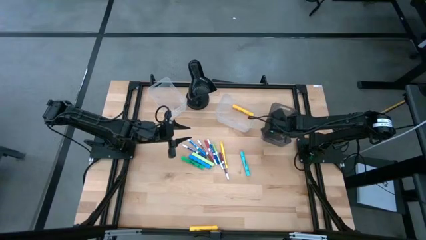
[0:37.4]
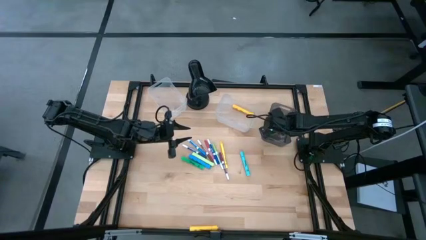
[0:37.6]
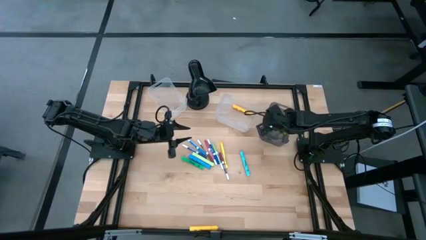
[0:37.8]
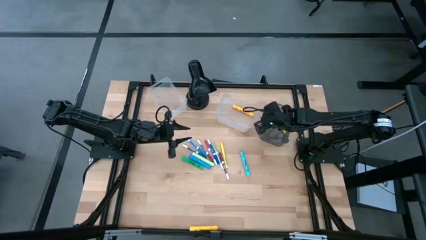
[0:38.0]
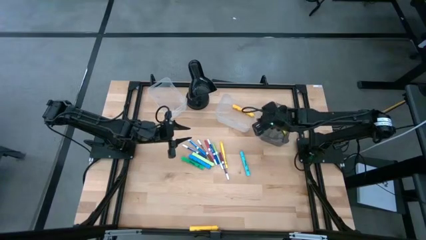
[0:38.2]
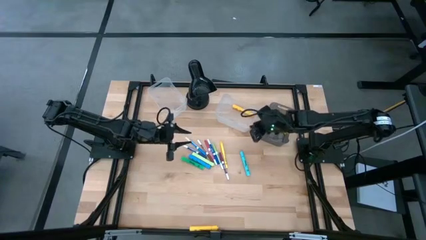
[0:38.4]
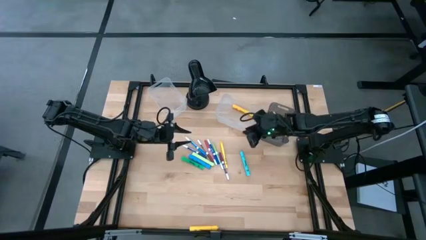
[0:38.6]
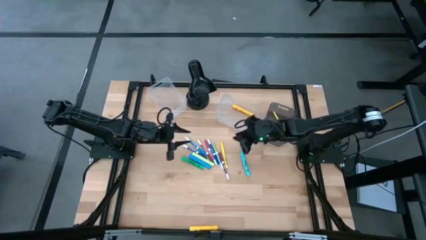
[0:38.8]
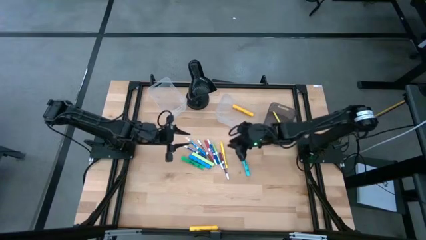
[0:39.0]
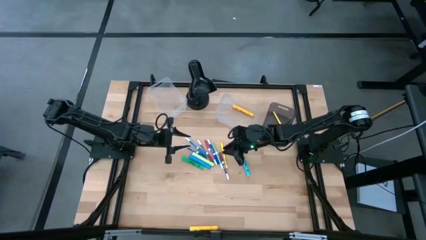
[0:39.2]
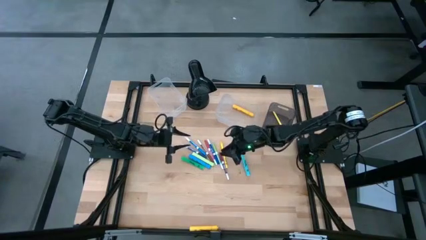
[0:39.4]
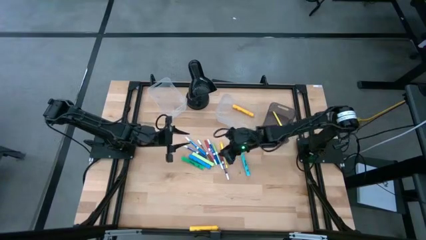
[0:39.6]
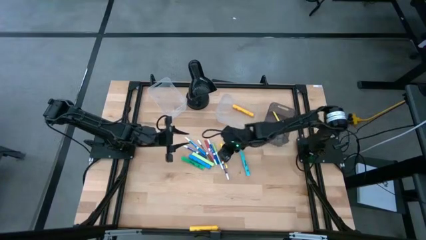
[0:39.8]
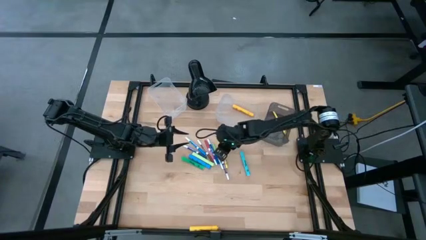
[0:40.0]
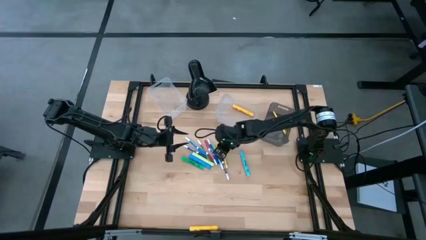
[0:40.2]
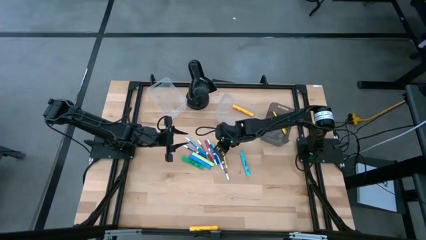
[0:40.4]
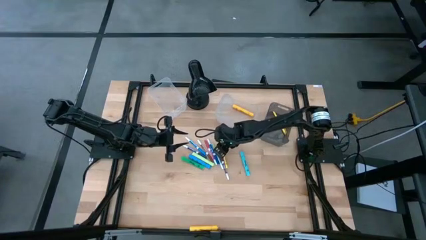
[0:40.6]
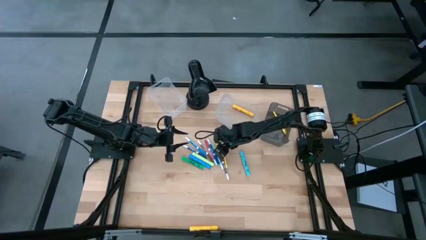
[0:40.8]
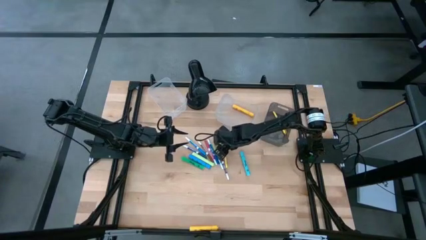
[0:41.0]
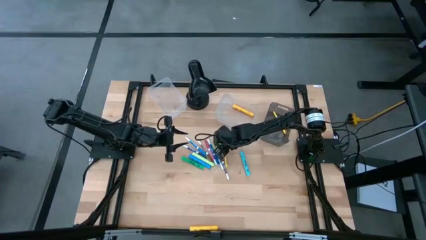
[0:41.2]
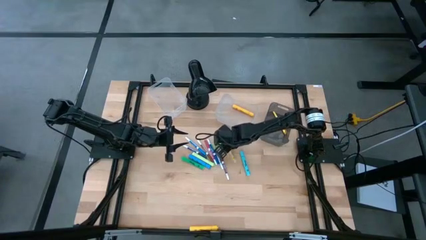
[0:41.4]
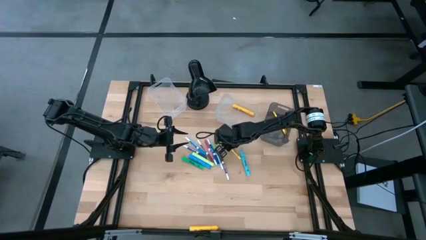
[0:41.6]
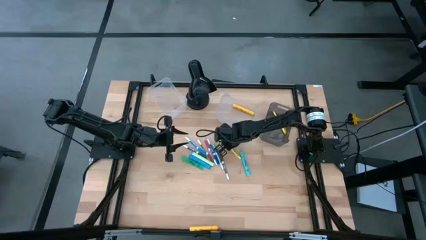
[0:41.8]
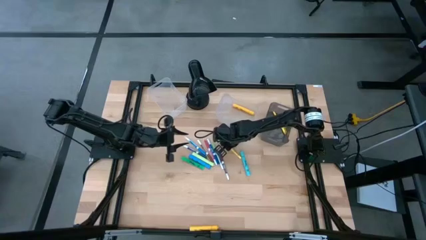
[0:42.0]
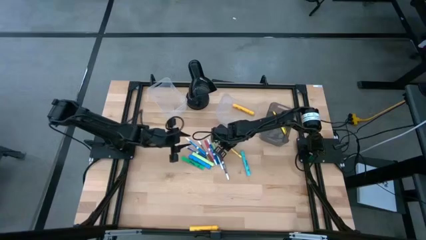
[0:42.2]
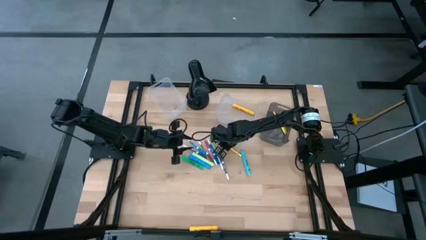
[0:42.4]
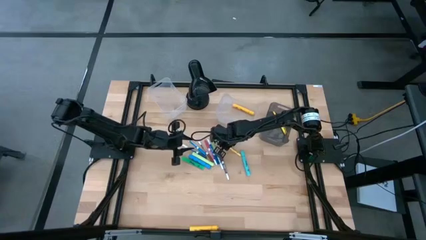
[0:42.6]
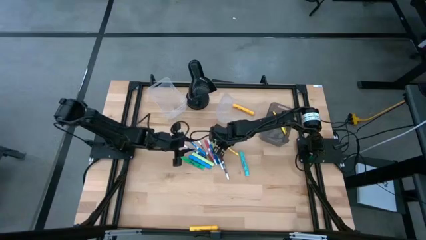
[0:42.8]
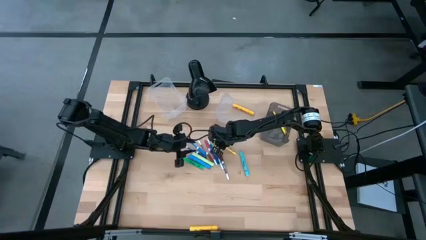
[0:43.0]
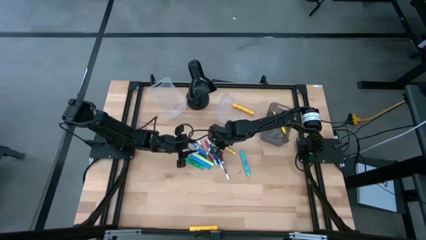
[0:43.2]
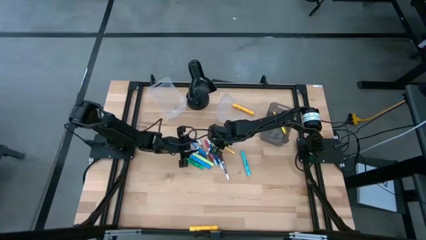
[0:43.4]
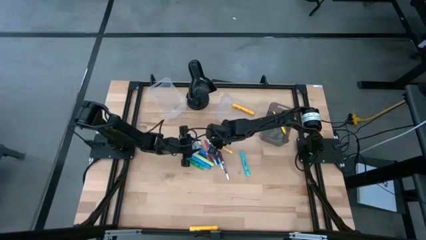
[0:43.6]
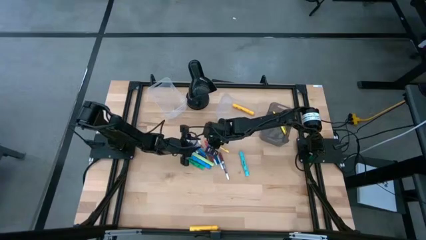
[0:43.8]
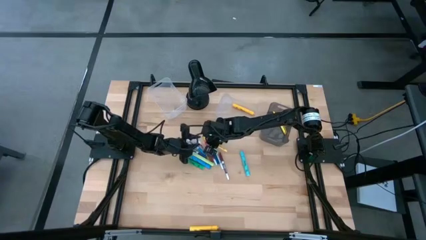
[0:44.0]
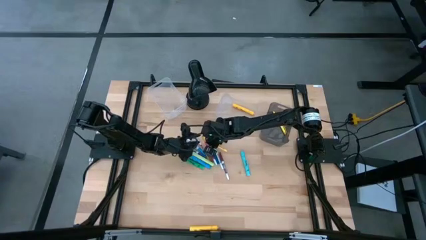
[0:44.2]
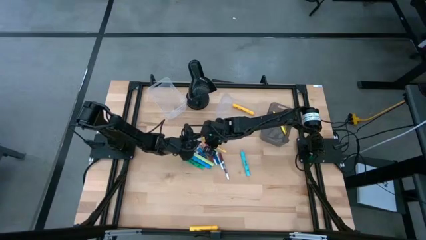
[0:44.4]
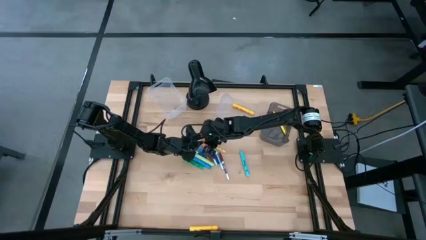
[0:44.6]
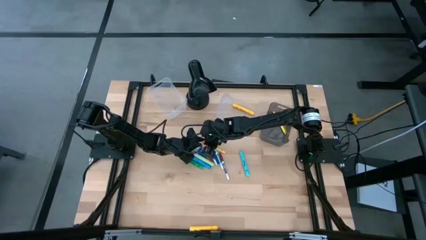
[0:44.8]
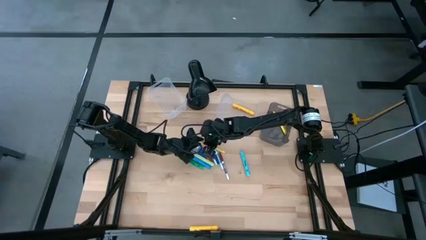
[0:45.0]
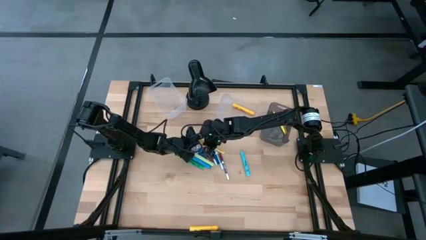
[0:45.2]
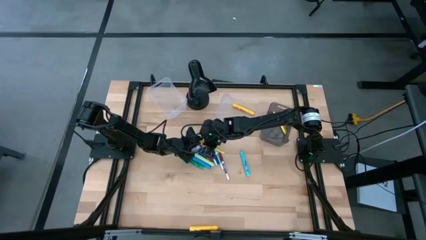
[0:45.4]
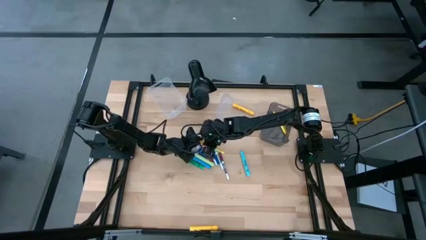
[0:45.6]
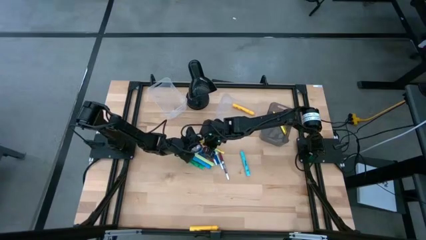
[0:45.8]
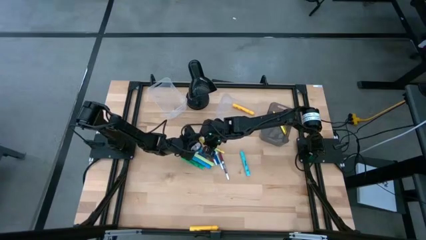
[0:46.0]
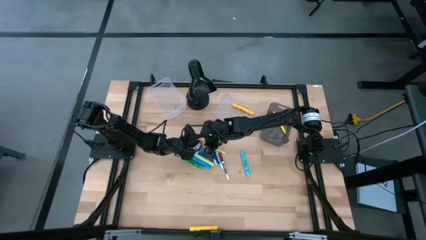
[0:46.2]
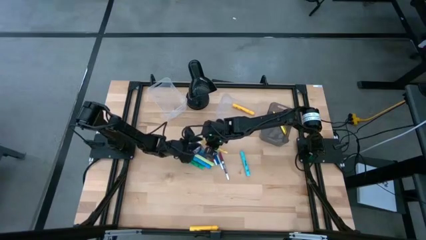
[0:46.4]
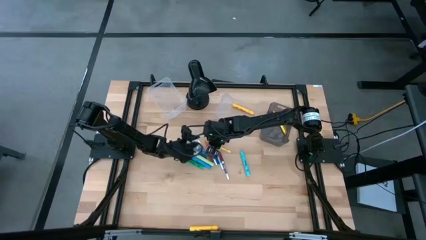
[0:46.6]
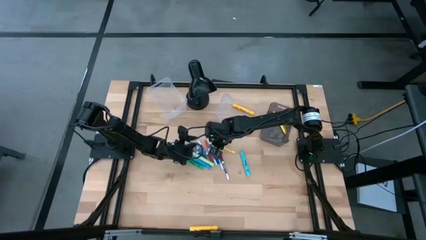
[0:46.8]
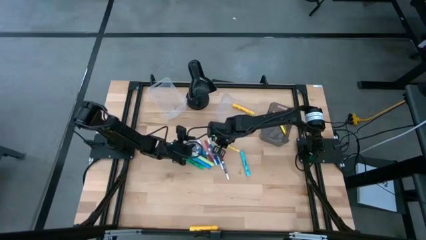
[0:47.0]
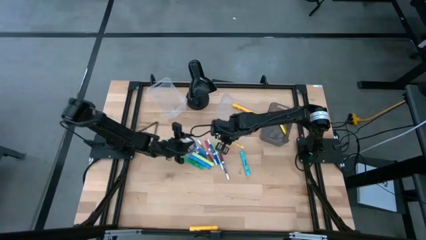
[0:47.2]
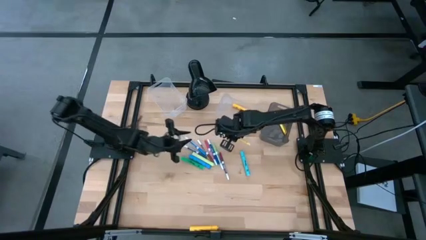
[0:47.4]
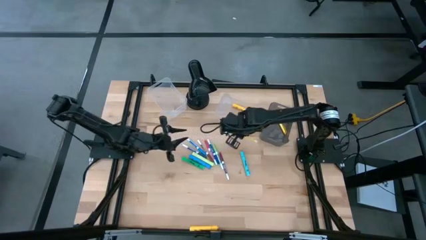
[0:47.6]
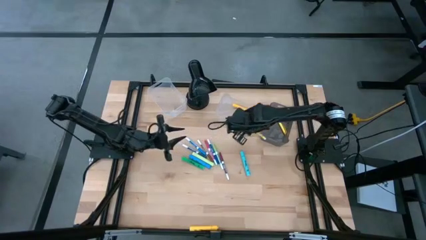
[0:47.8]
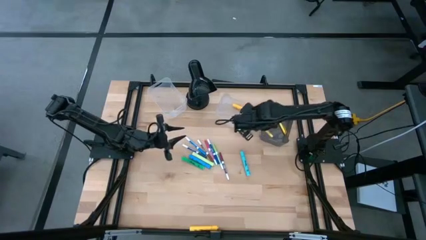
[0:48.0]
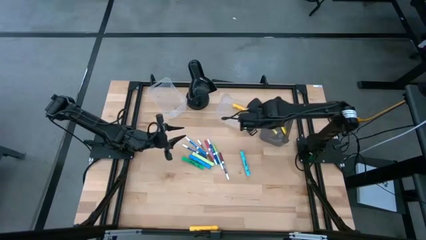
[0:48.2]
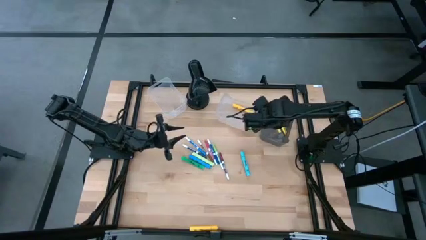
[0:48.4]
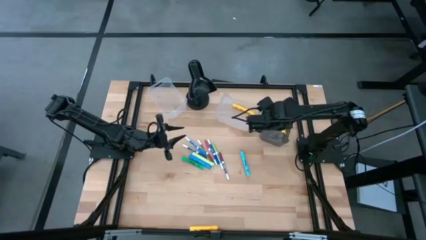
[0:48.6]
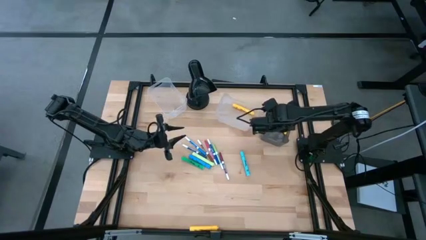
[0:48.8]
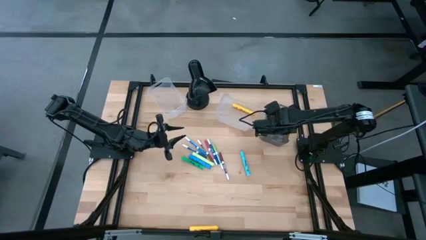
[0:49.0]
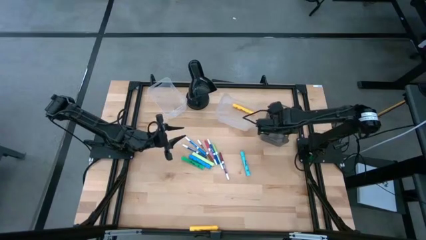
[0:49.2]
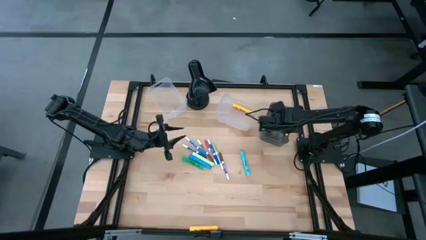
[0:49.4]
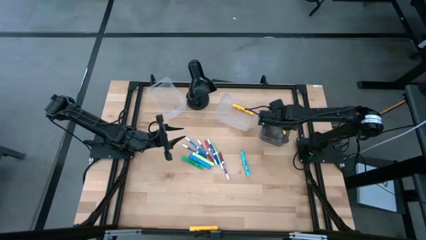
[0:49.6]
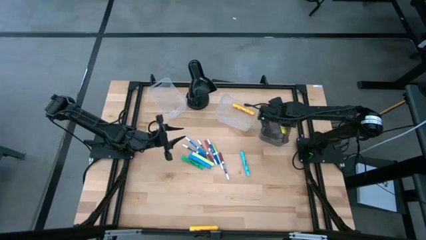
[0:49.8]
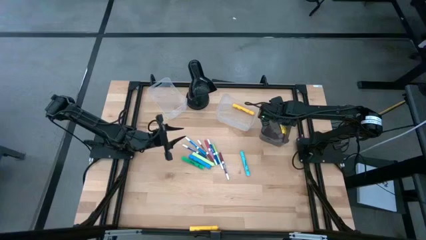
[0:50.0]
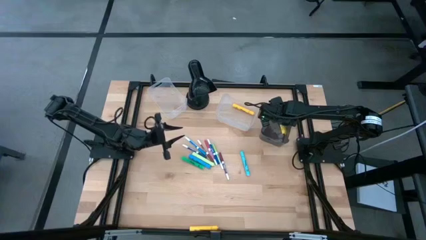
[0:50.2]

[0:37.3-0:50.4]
Task: Pick & Place Markers
Put the yellow pen in the gray bin
